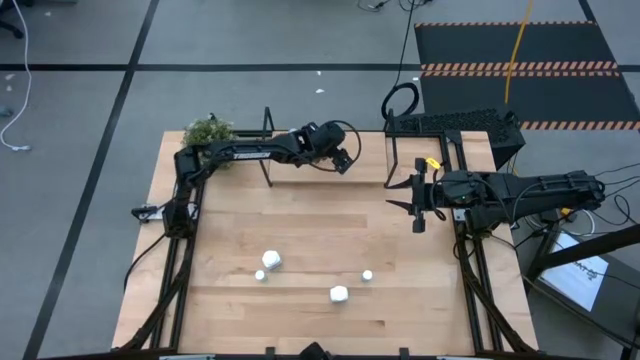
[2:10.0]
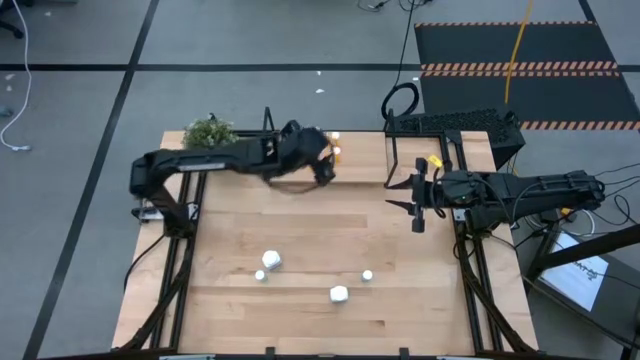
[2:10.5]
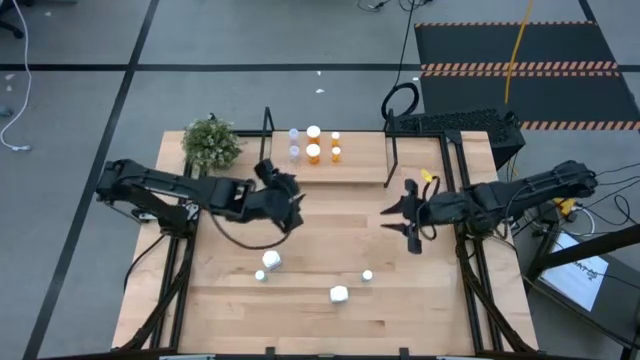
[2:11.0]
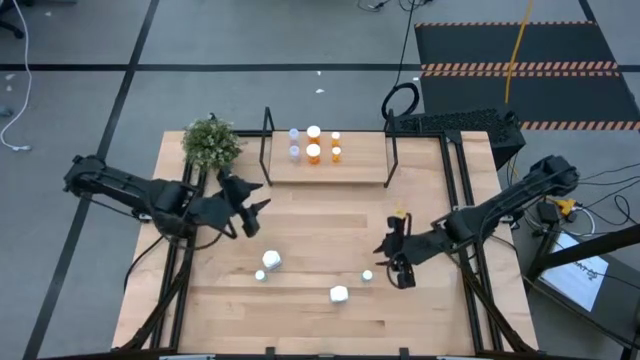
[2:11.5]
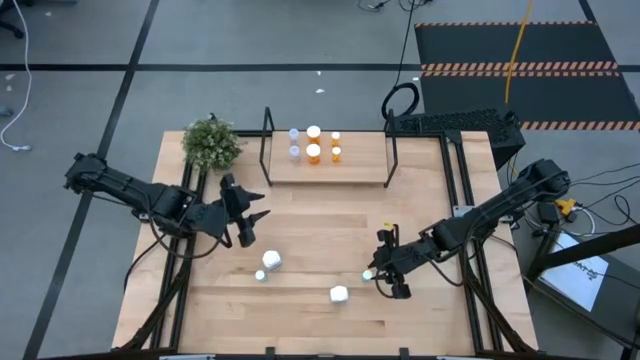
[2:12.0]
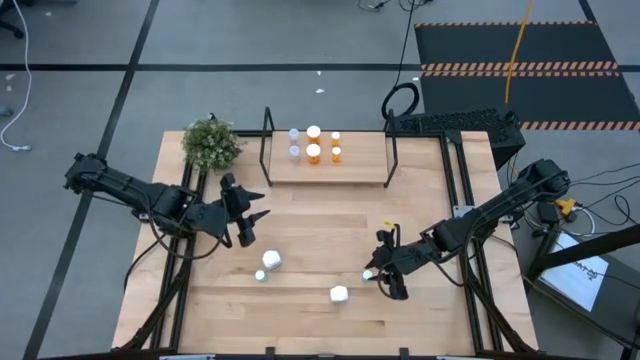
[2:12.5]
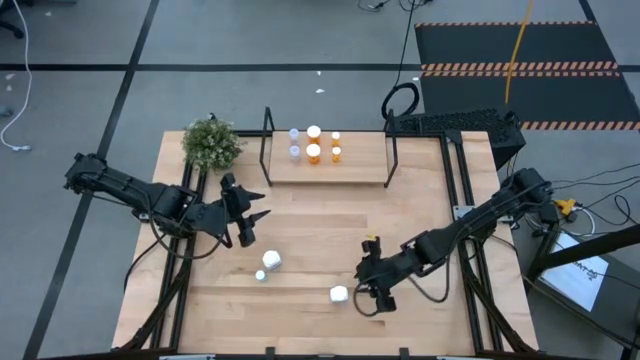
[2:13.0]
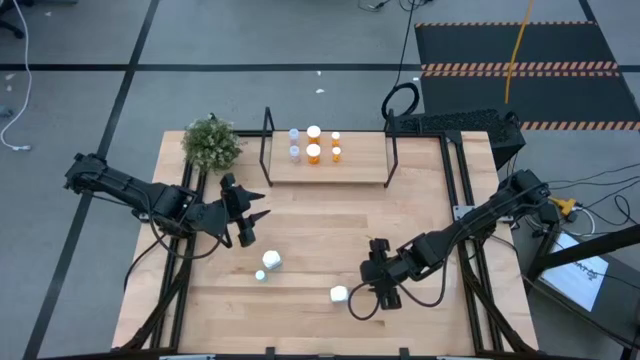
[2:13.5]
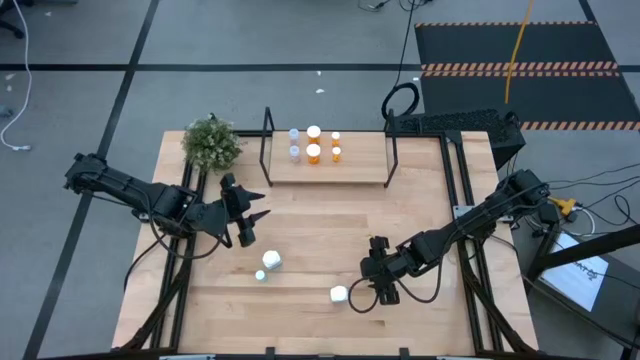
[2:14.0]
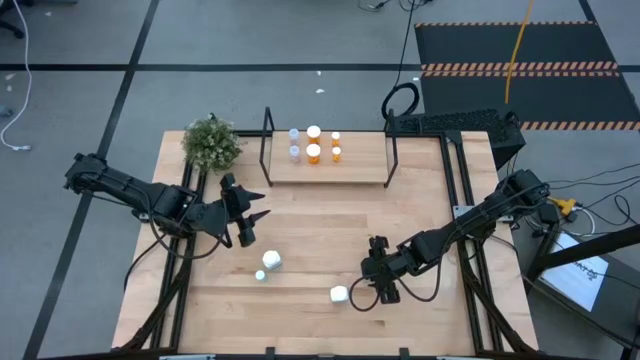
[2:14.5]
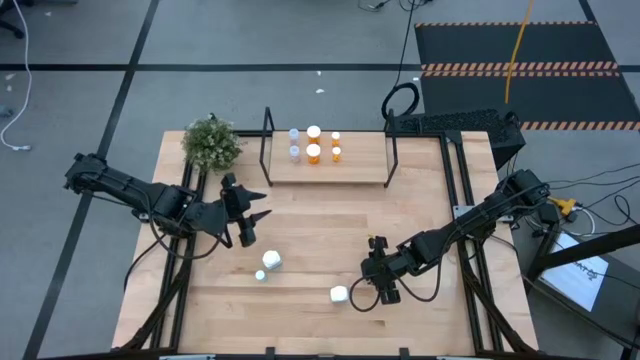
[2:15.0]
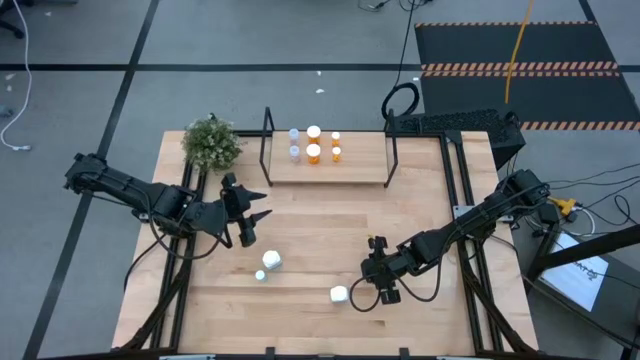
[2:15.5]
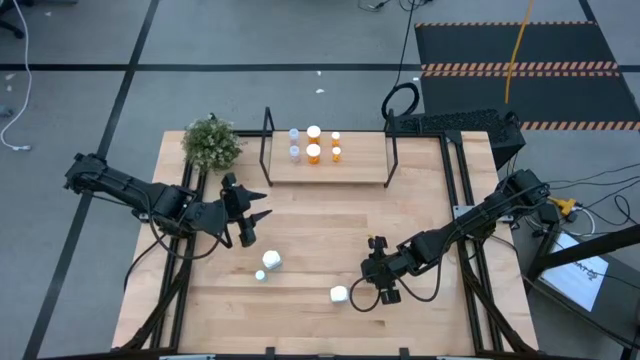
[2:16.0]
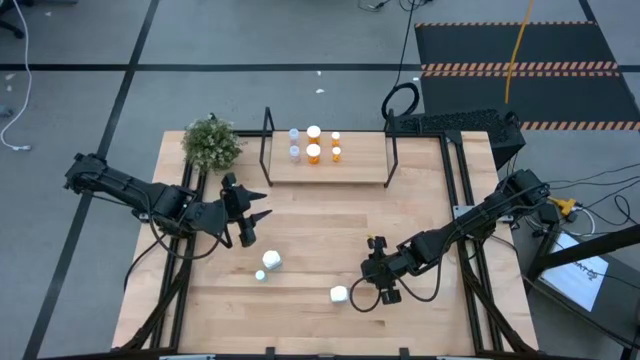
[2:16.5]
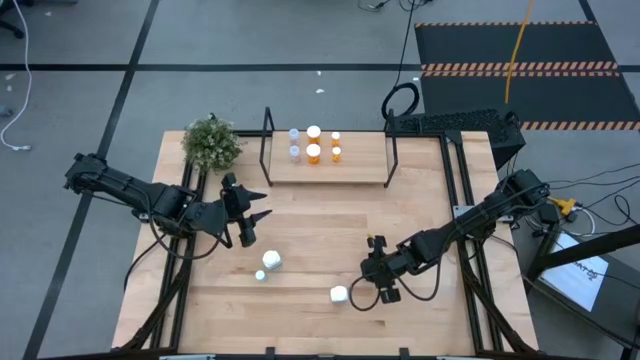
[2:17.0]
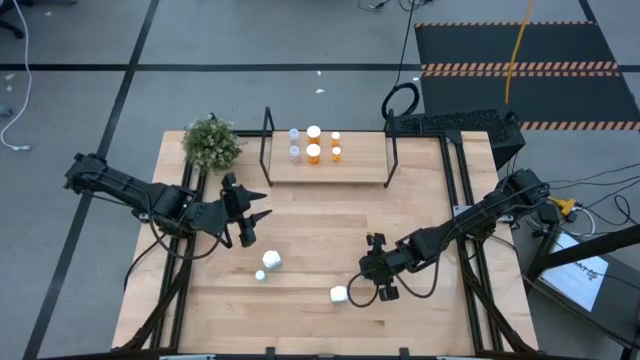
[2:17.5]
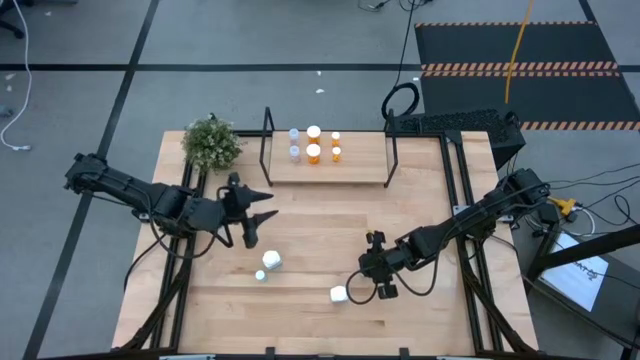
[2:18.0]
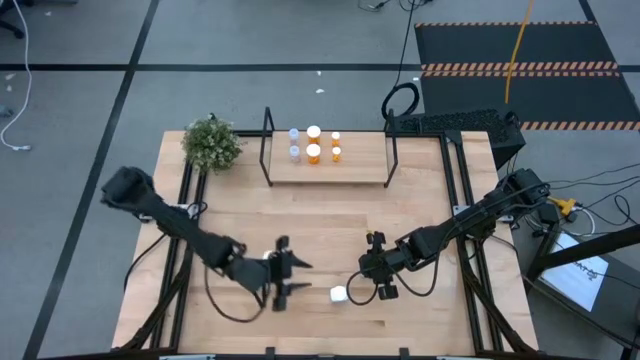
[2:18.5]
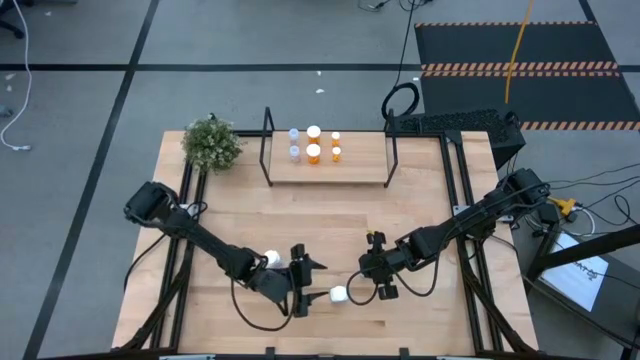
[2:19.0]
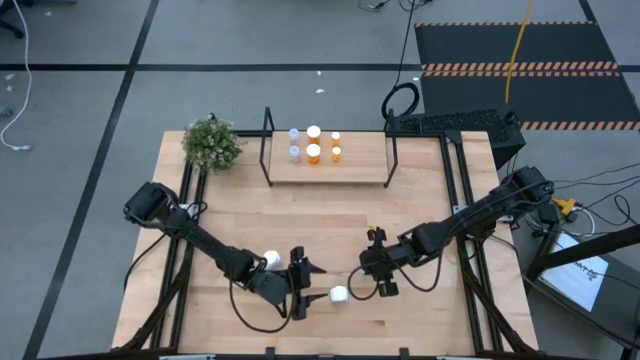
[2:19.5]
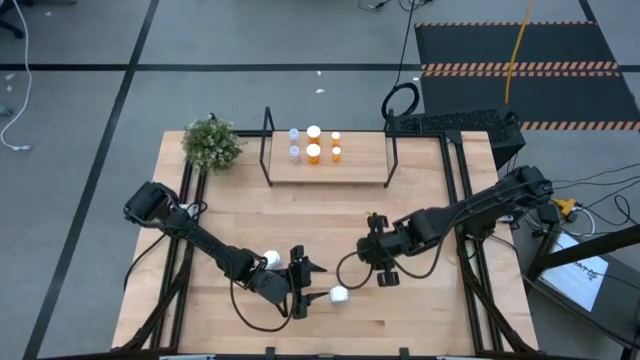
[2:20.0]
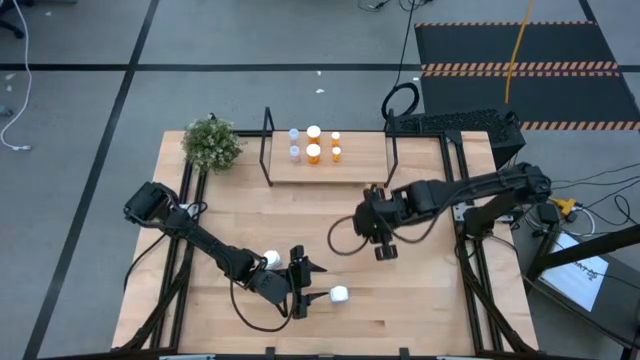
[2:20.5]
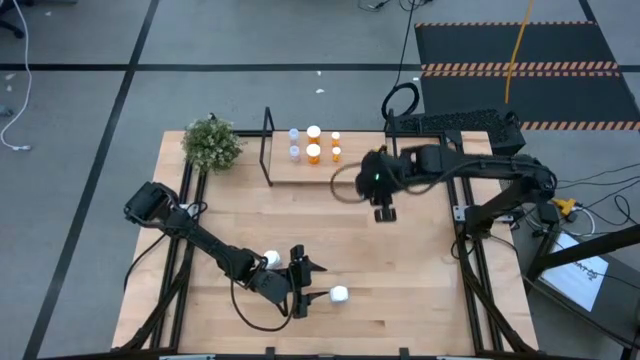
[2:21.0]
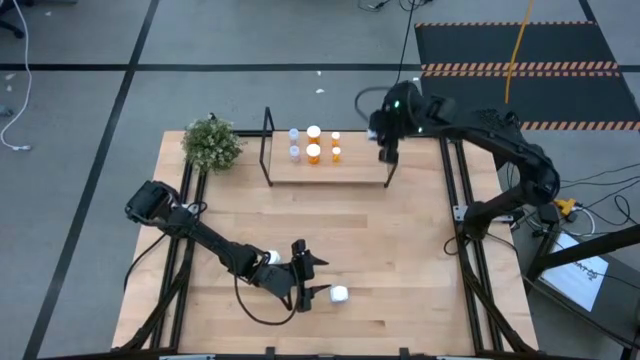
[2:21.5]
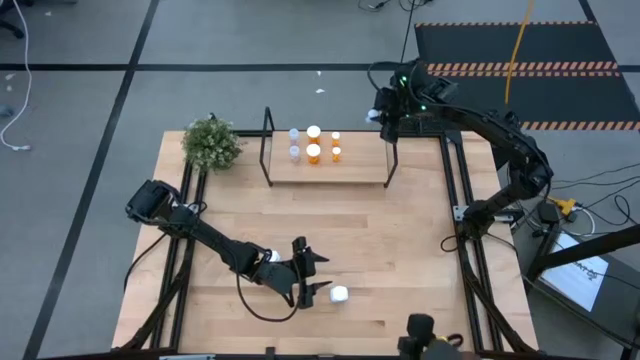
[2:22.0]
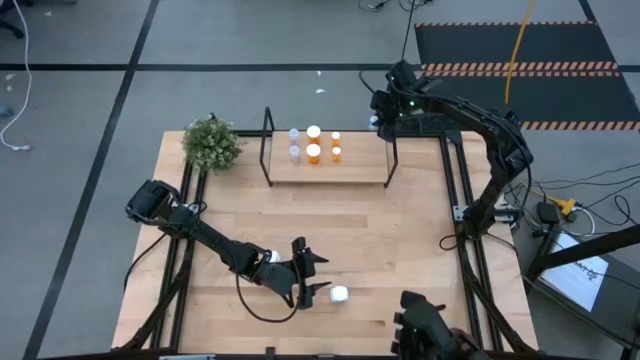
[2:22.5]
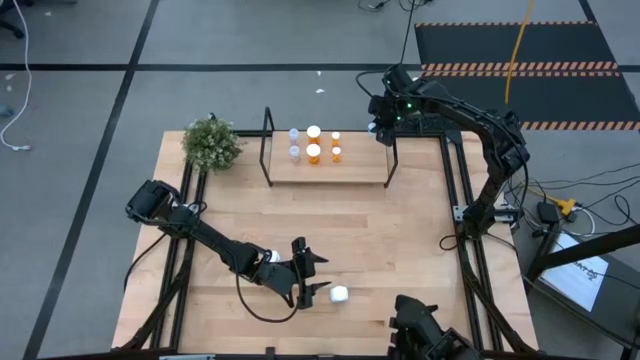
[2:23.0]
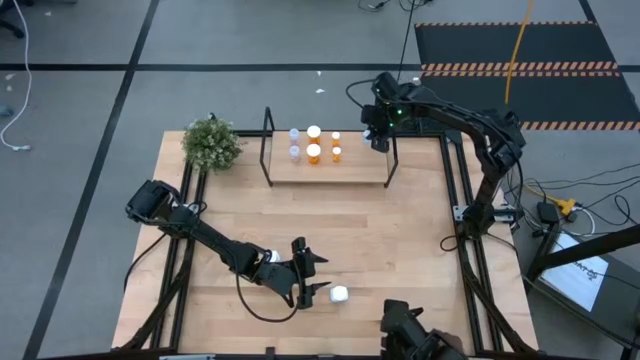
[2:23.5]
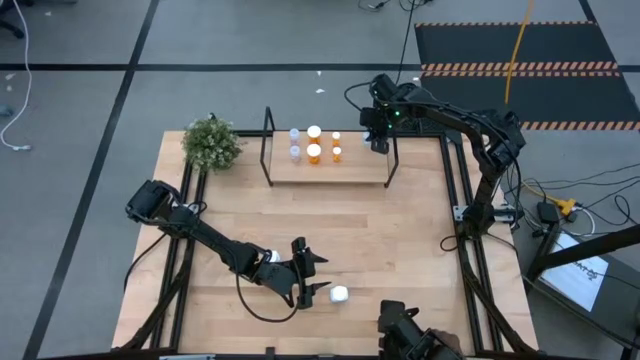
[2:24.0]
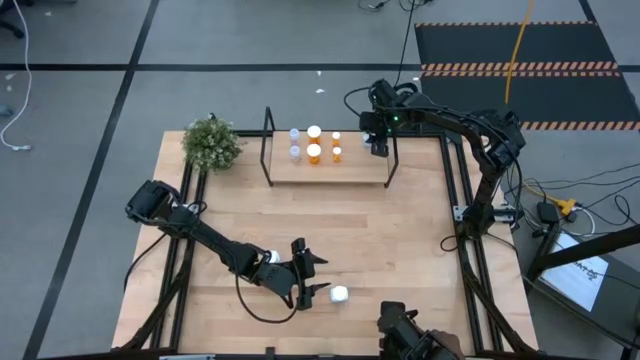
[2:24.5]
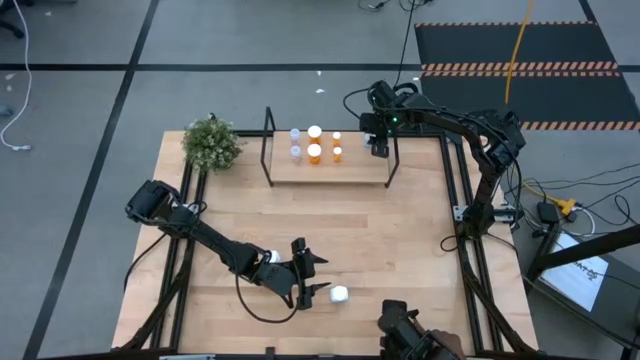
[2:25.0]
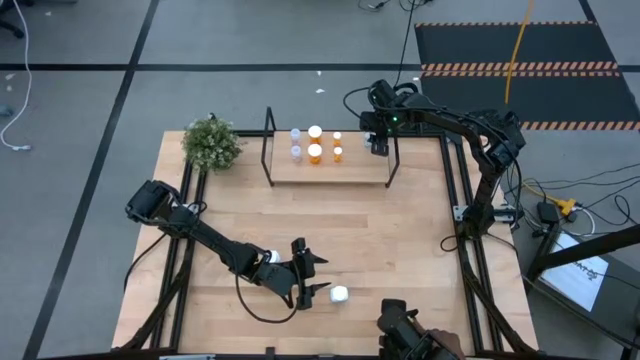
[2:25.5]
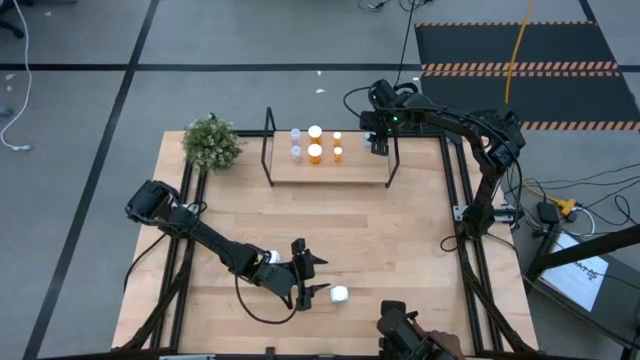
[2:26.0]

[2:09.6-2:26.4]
Task: Pick and place medicine bottles onto shelf by color
Put the right blue pill bottle on the shelf

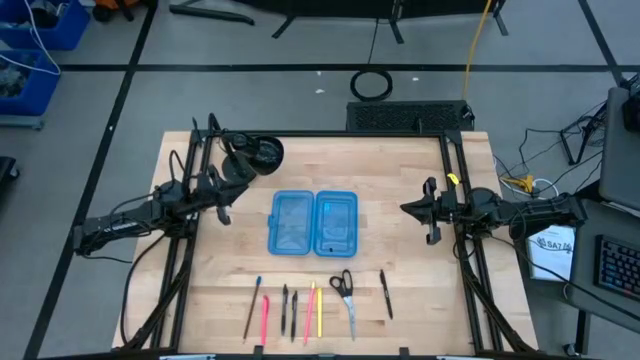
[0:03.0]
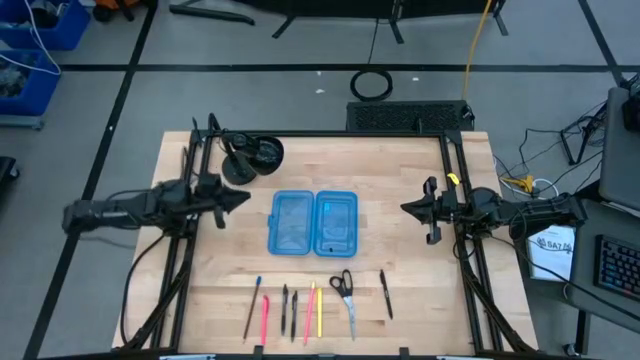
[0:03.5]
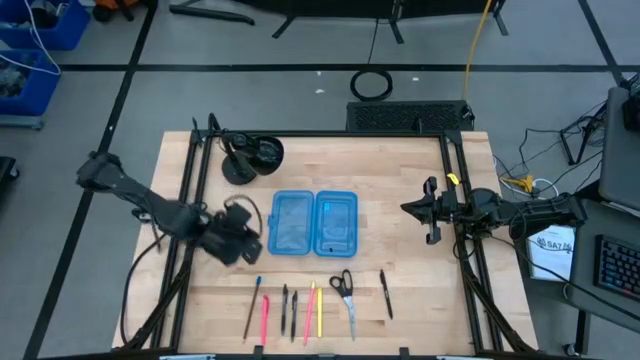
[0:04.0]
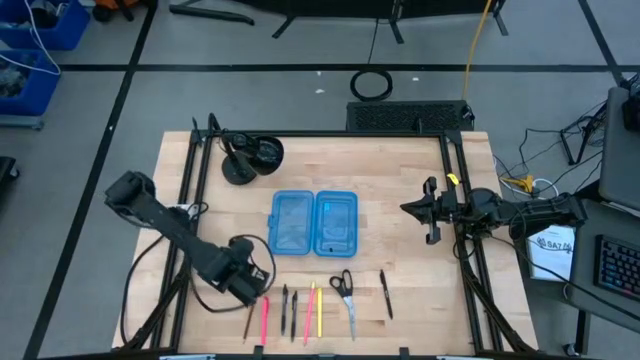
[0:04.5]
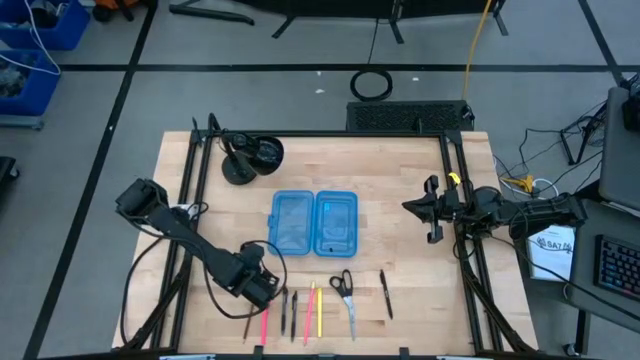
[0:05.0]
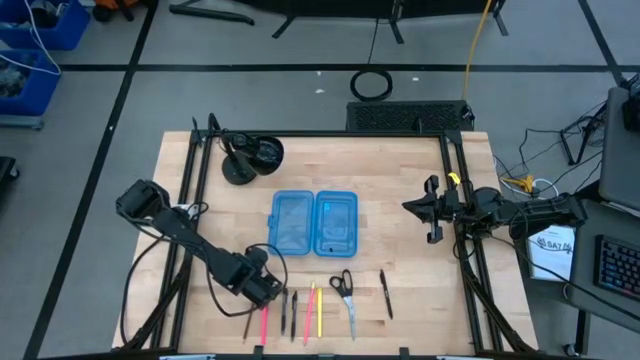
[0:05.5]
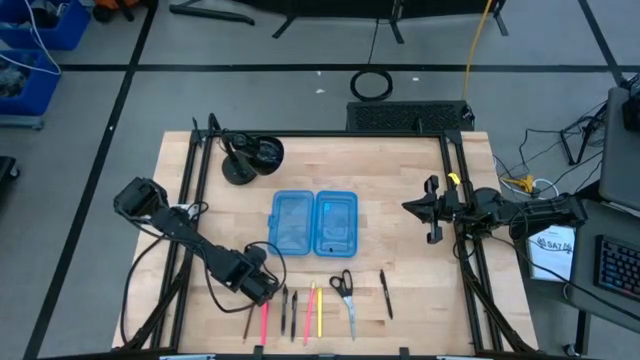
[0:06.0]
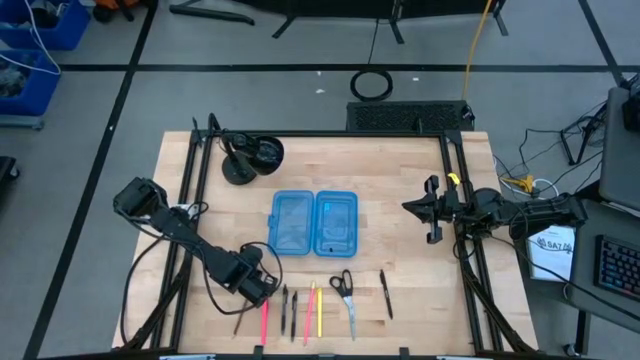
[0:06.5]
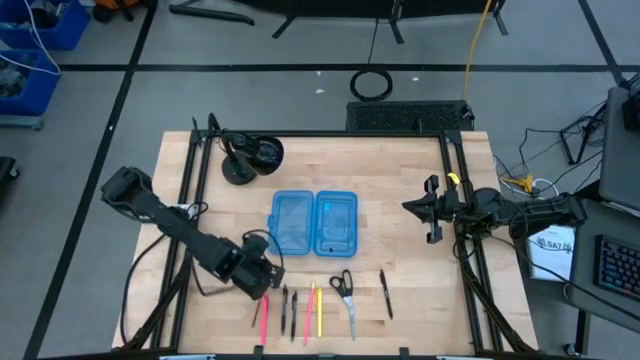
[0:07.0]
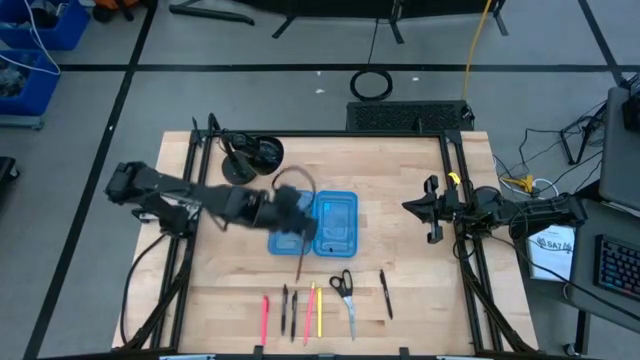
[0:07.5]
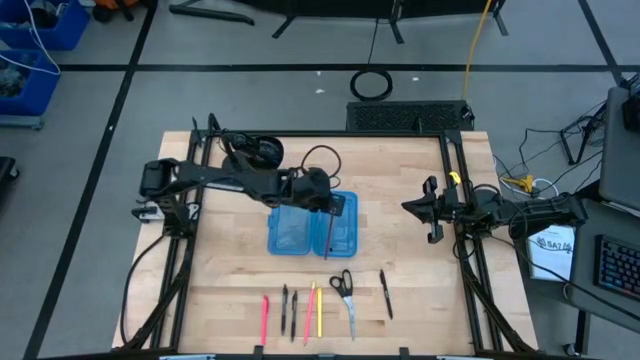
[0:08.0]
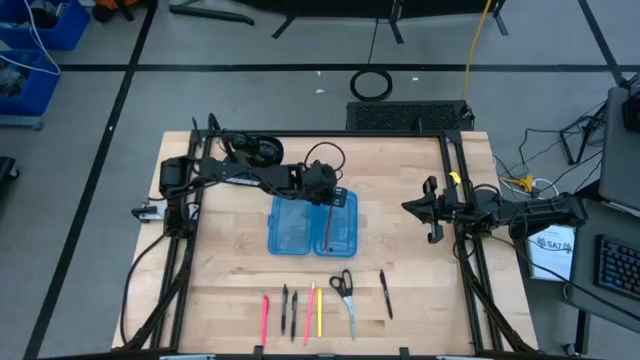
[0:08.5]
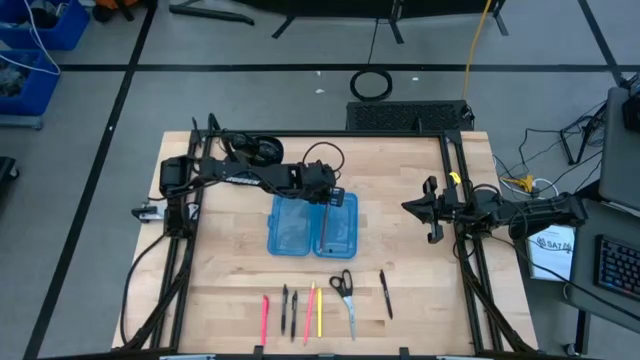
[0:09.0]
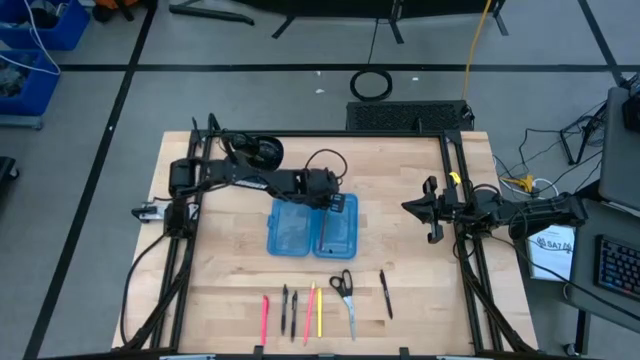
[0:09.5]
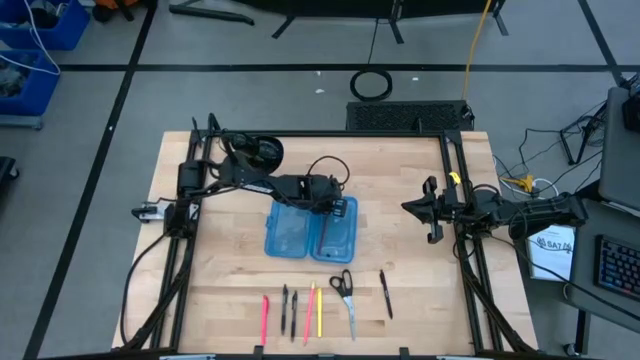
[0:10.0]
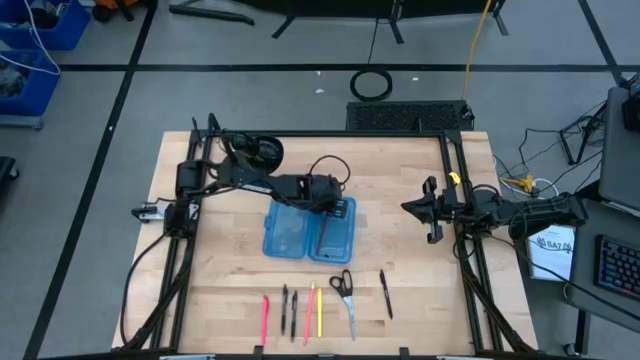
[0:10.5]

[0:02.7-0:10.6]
Task: Pick & place school supplies into a supply box
Put the brown pencil into the blue box
